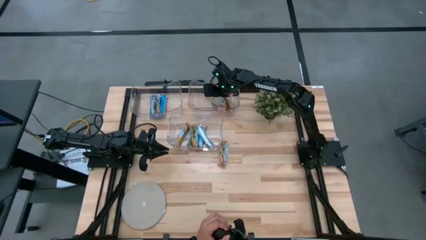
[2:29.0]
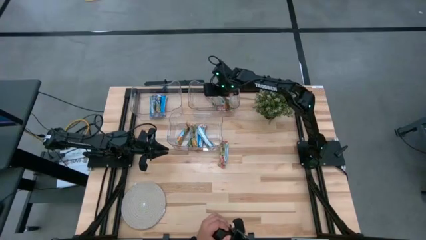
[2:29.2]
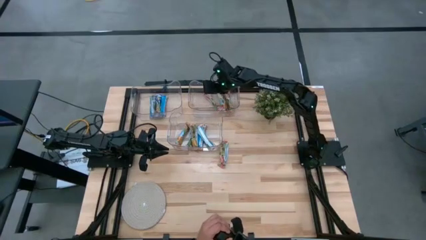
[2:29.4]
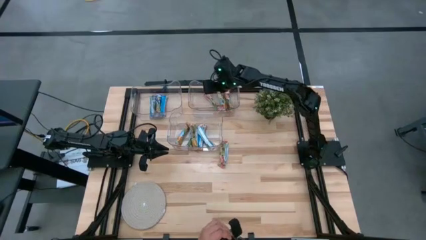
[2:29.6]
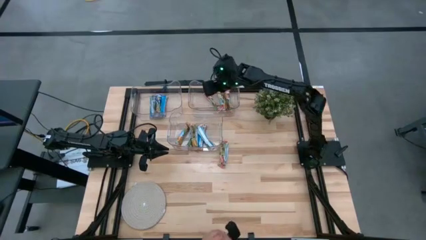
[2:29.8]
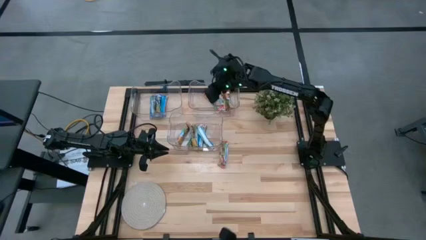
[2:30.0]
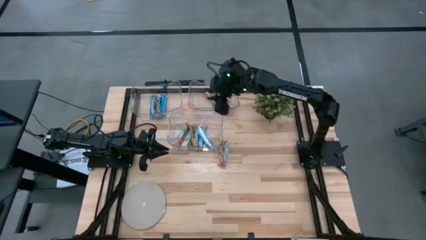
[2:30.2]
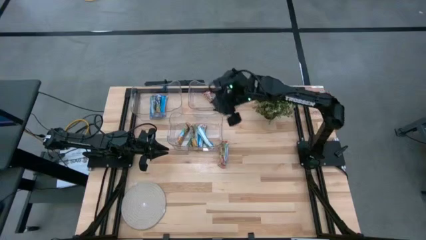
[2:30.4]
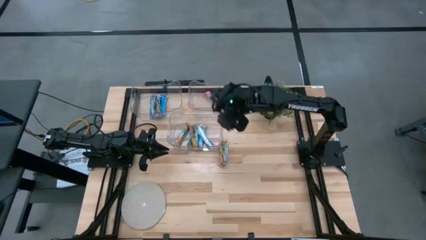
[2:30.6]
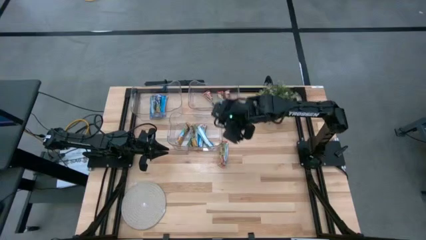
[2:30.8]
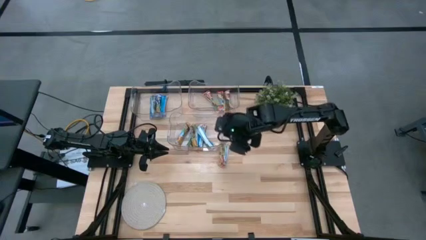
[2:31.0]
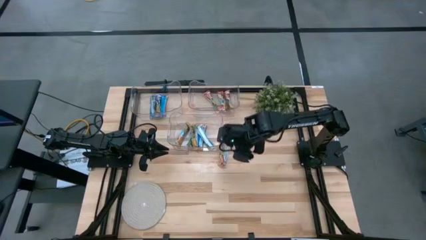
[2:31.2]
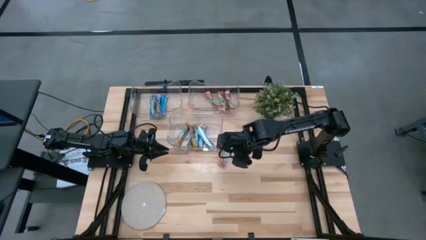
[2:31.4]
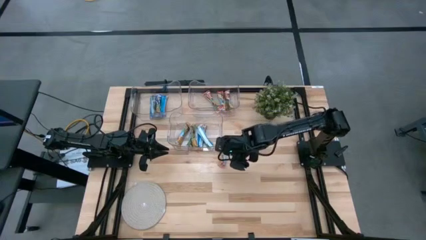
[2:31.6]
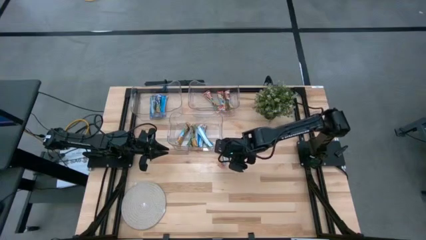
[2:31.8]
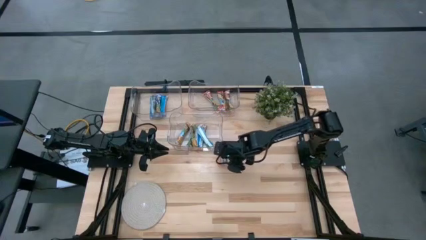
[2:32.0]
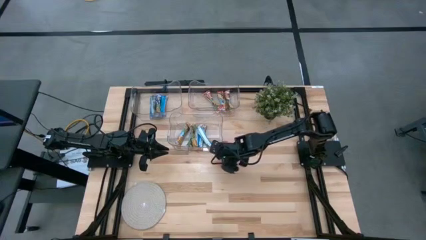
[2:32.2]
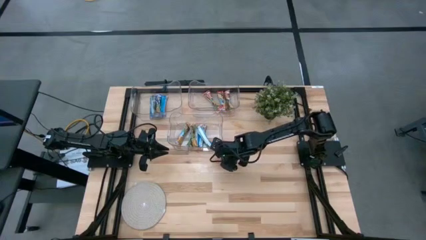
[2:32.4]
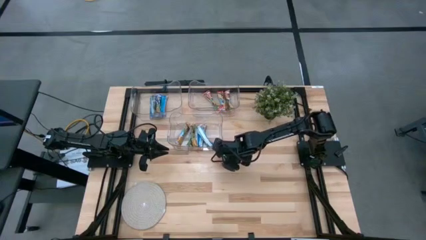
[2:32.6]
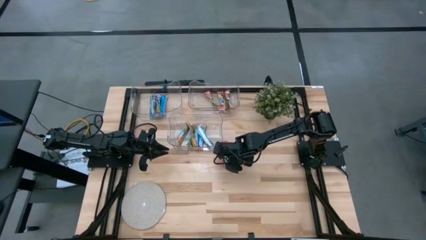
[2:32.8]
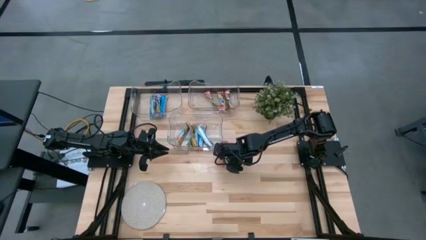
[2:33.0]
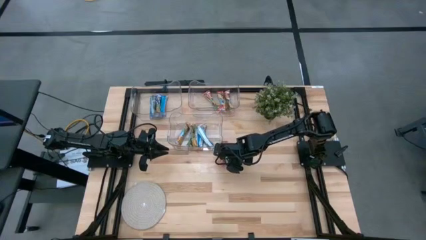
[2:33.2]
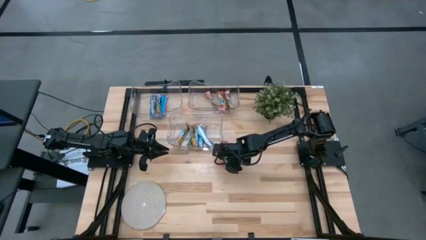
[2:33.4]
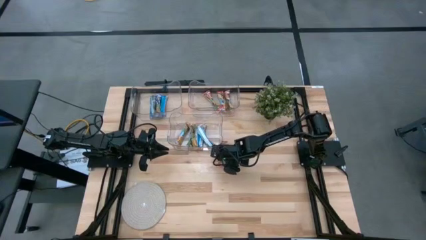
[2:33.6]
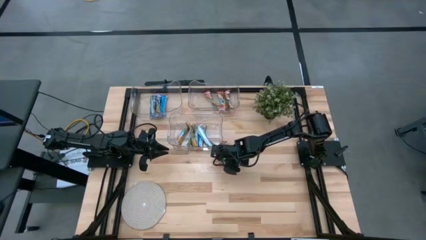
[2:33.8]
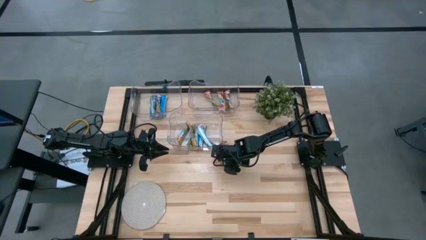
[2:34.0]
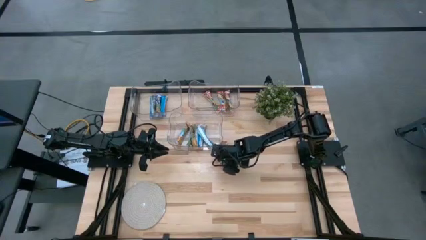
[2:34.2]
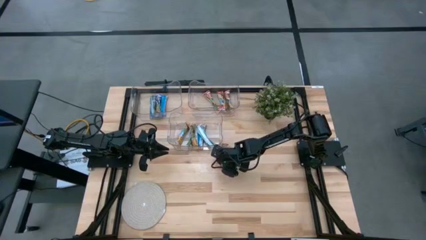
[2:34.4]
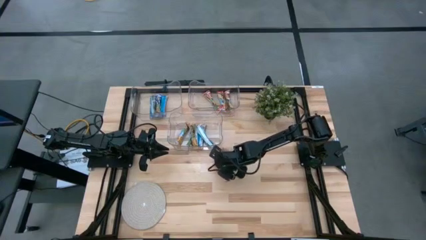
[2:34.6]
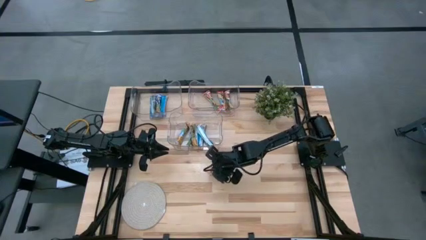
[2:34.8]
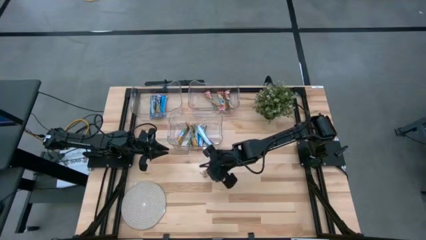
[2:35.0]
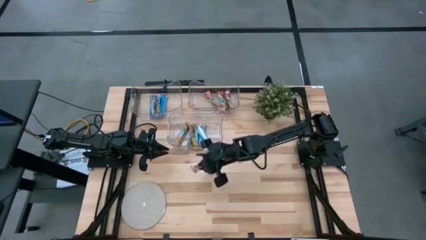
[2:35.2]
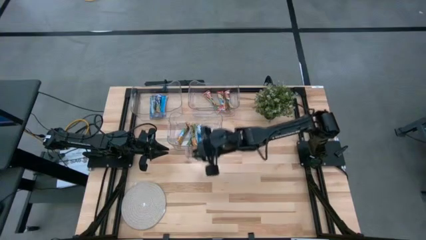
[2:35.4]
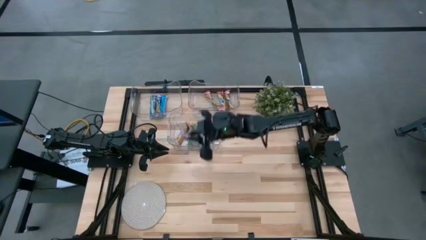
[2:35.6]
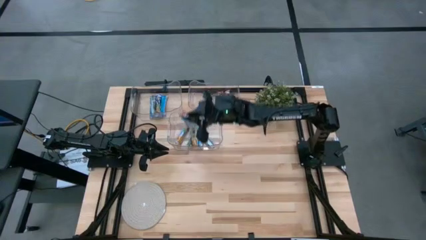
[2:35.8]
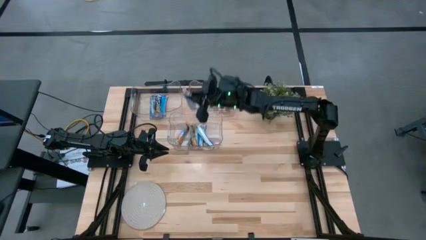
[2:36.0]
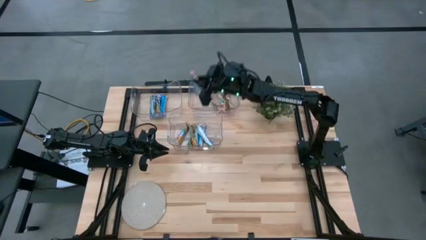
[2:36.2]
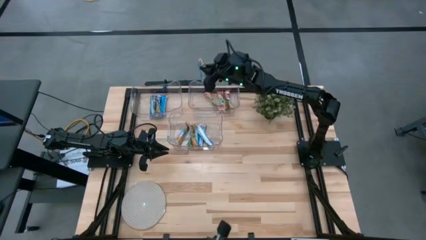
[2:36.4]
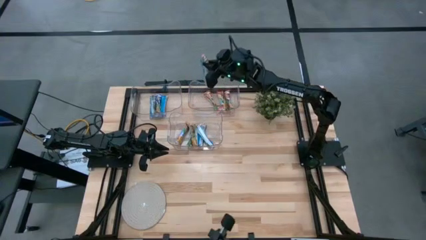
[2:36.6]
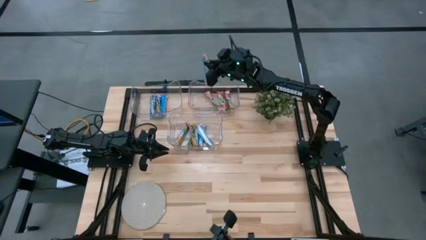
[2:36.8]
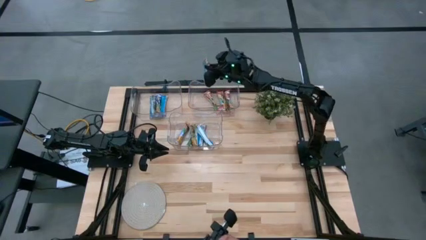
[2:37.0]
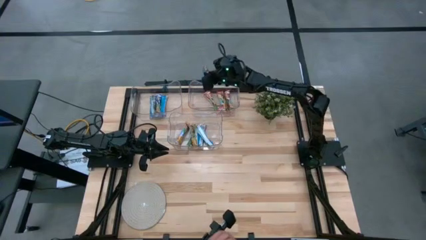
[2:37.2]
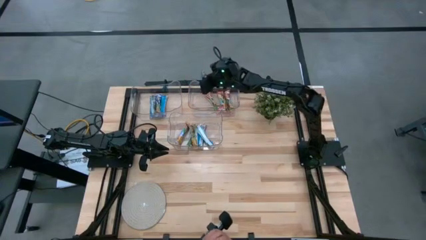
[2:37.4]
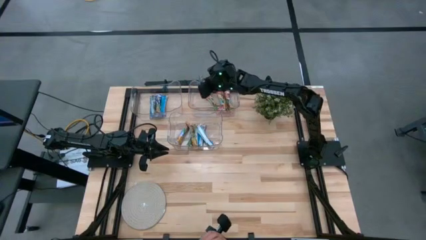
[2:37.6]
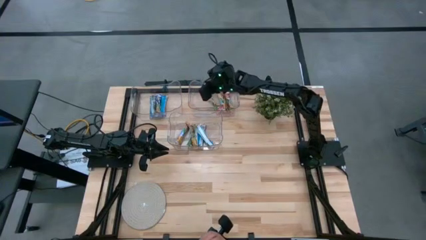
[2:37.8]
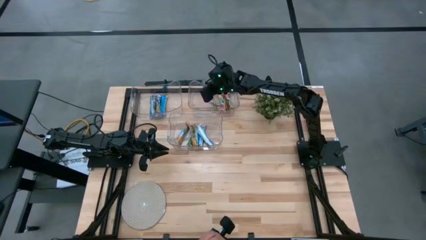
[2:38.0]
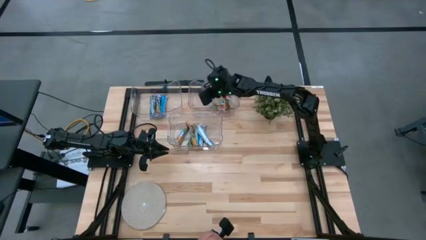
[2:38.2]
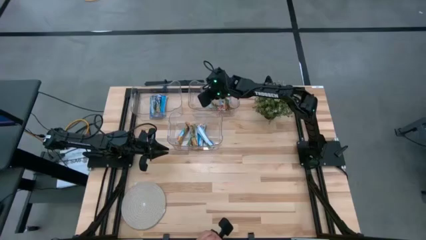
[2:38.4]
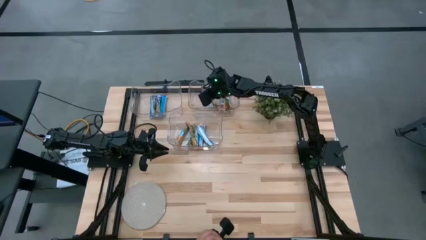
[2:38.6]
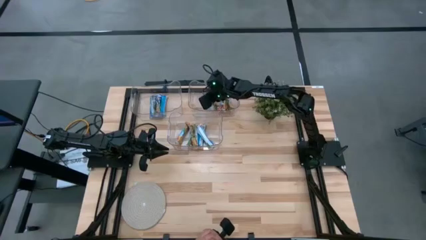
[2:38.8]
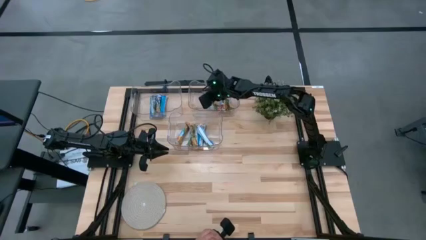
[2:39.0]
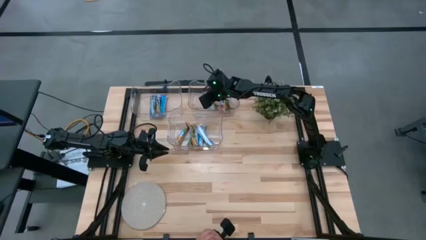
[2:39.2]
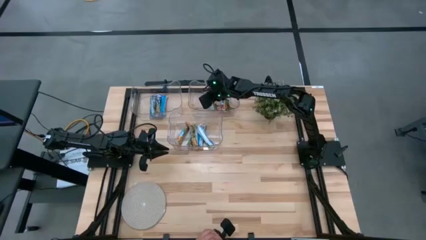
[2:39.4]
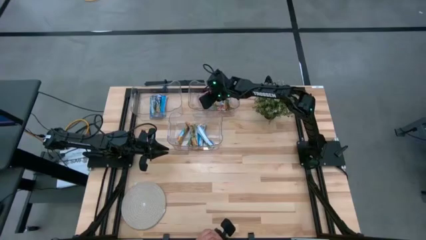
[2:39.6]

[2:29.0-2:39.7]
Task: Pick and place Granola Bars by type
Put the red granola bar into the top right transparent bin

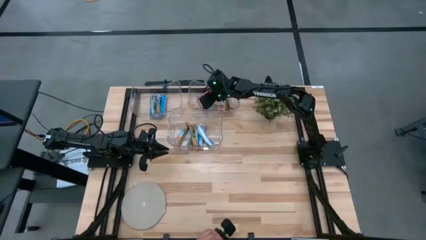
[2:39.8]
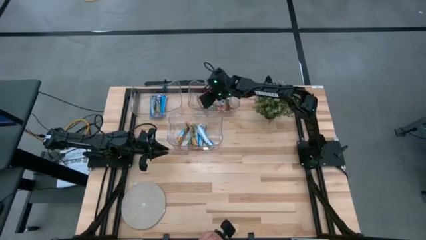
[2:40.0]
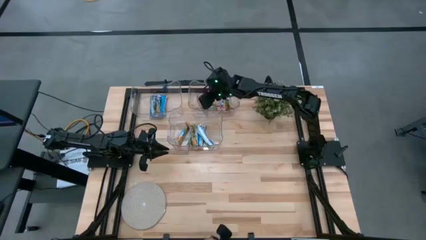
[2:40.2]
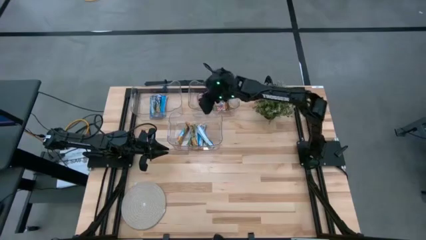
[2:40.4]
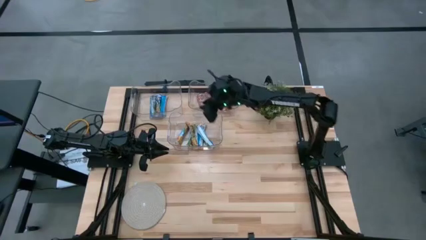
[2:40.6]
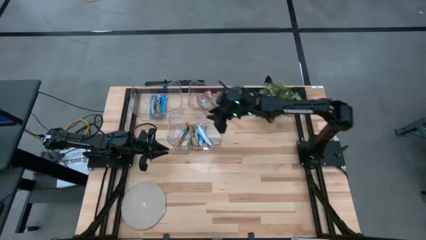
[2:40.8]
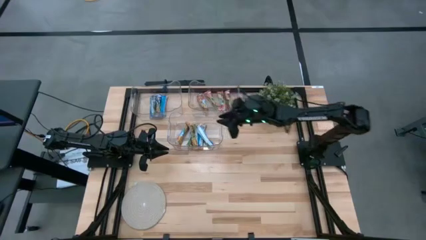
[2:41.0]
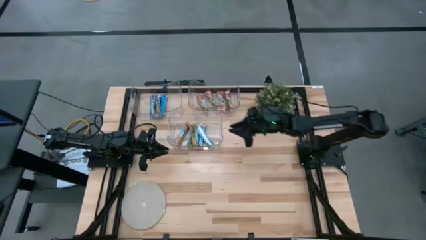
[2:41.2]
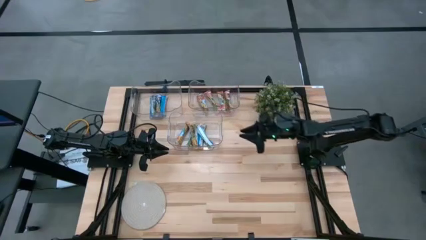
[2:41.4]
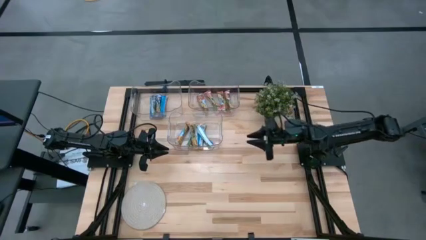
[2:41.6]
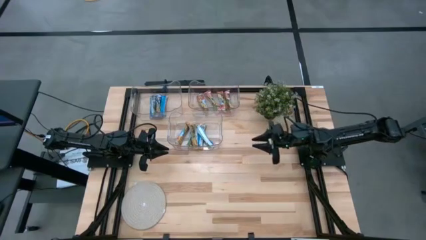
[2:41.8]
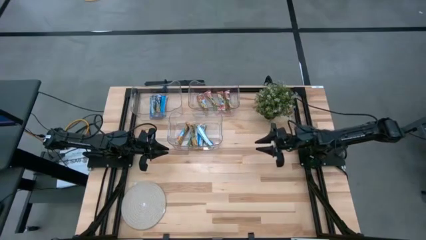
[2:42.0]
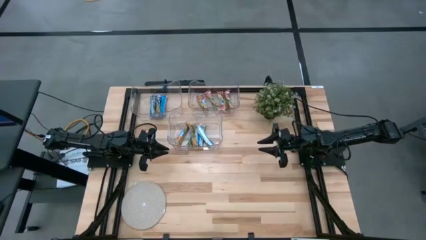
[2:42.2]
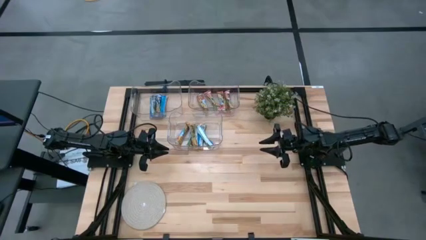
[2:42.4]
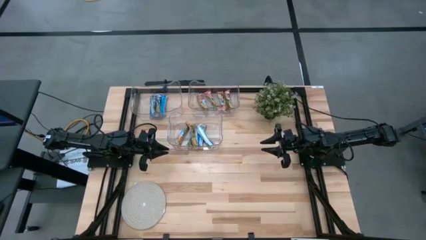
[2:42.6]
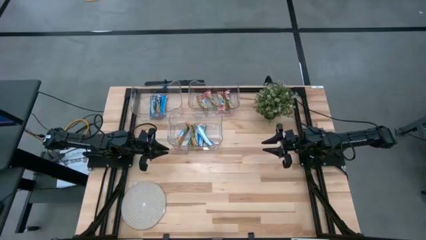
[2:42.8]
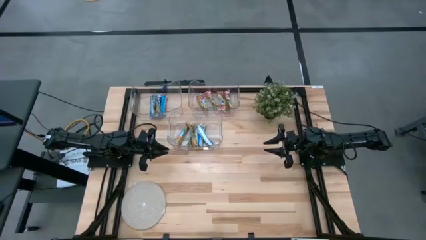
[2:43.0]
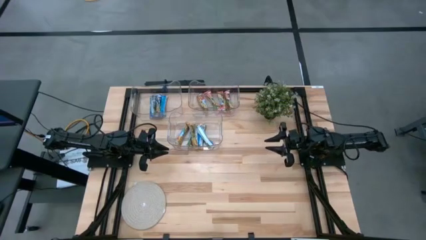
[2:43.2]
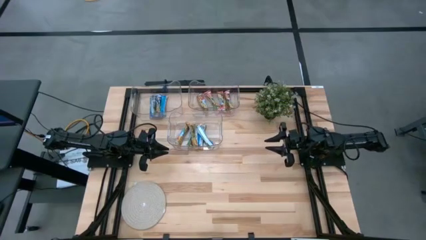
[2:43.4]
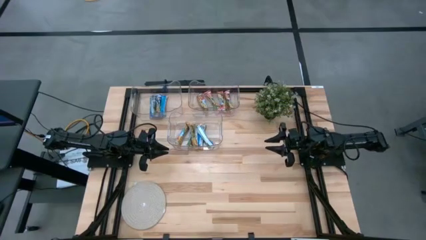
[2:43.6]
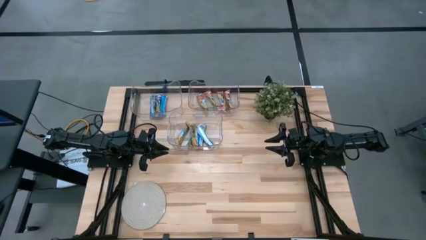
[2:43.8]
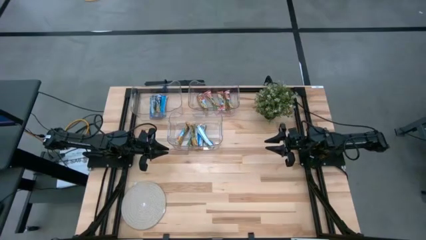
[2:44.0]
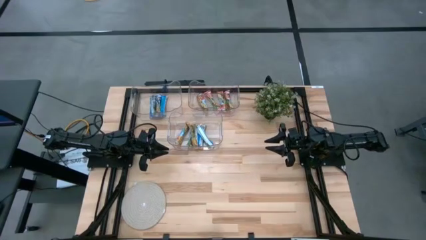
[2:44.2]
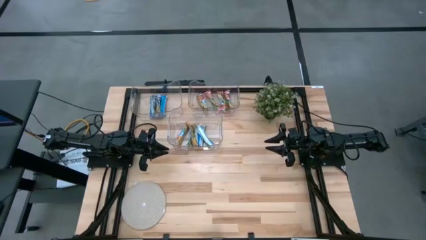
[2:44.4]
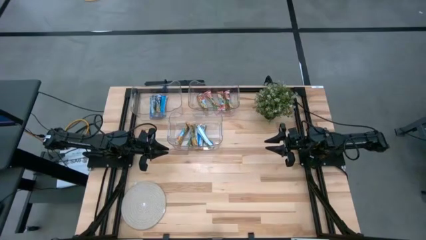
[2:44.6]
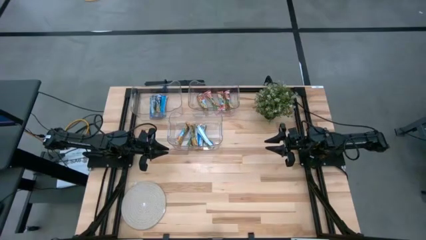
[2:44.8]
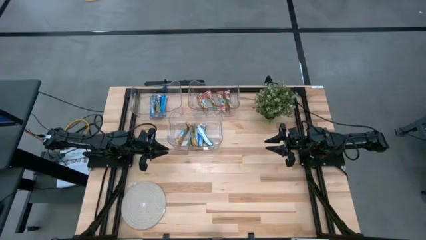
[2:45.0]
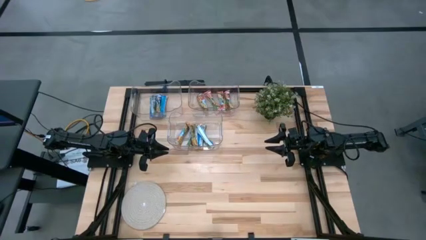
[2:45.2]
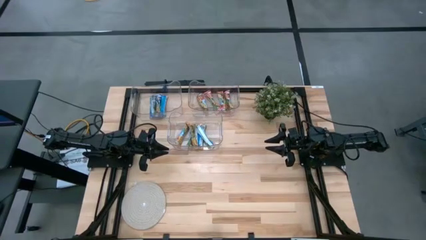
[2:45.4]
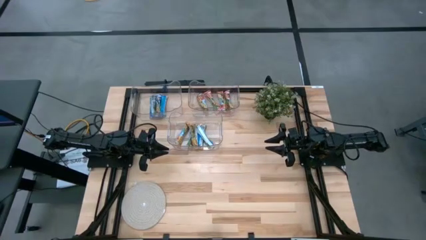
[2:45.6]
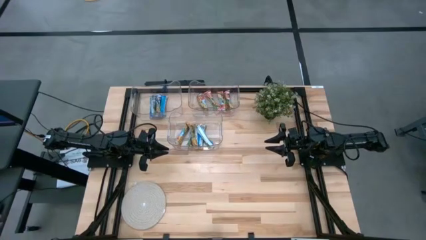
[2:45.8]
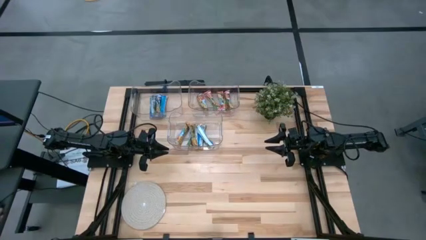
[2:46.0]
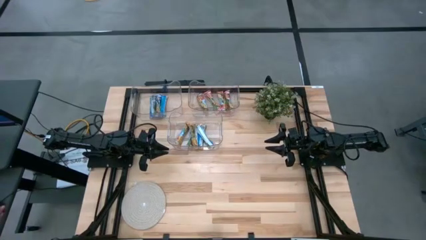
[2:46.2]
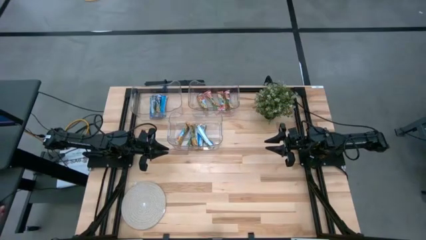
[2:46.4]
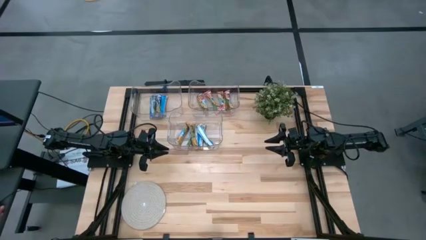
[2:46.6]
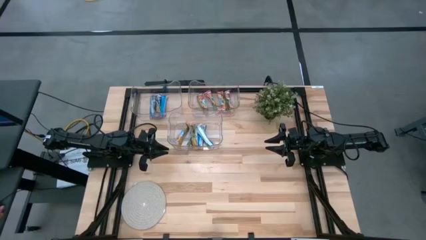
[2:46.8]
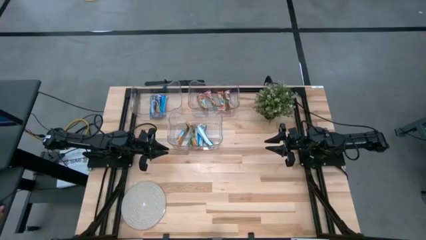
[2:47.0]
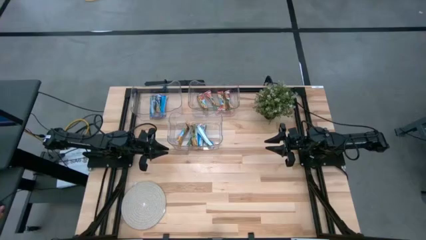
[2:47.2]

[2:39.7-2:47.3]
Return to Home Position
